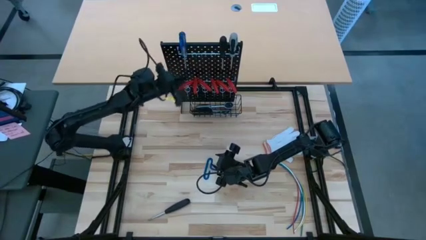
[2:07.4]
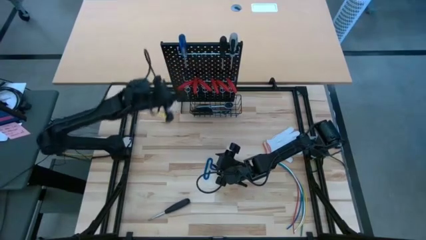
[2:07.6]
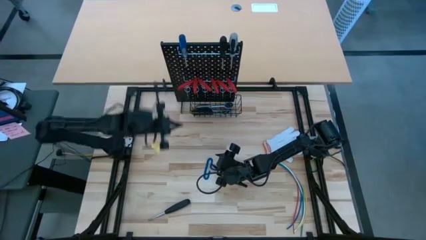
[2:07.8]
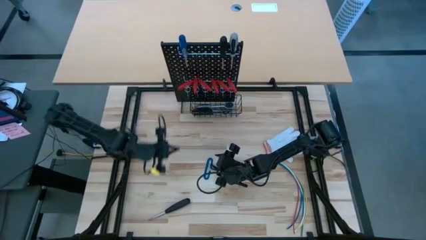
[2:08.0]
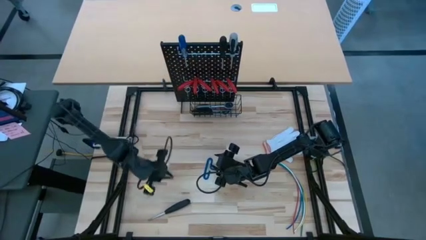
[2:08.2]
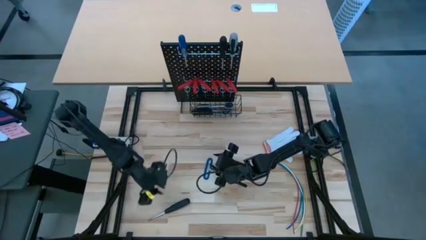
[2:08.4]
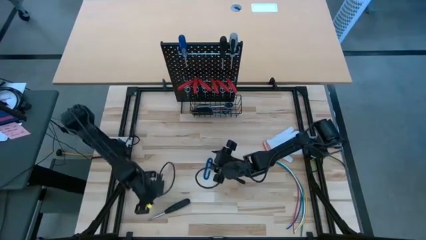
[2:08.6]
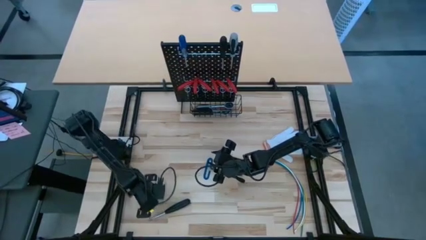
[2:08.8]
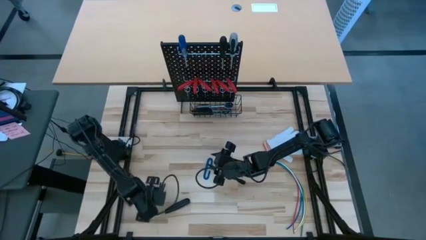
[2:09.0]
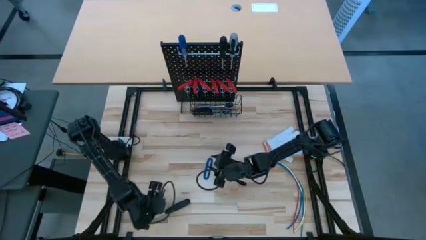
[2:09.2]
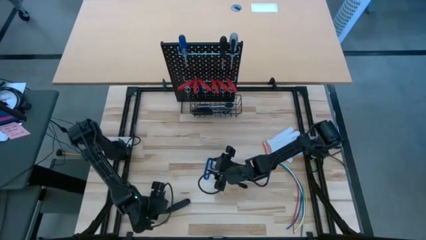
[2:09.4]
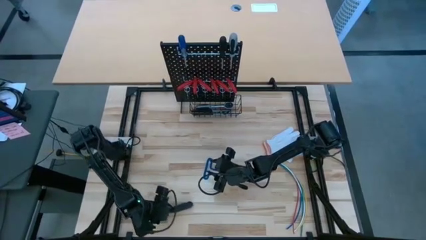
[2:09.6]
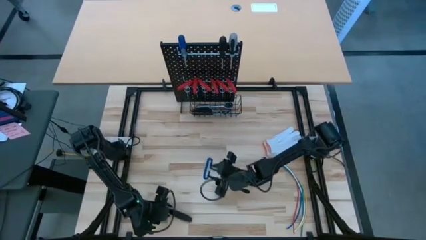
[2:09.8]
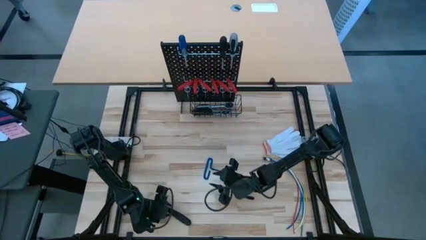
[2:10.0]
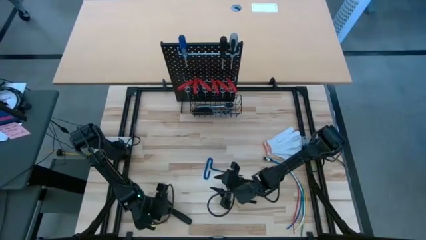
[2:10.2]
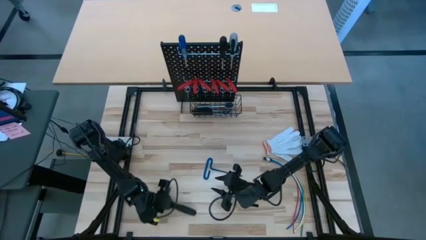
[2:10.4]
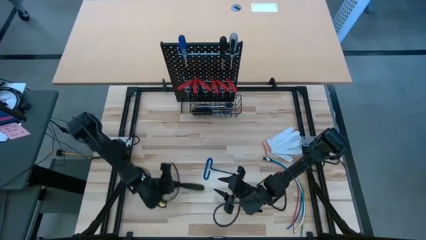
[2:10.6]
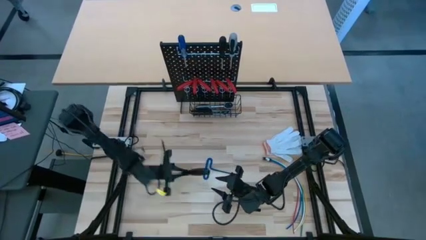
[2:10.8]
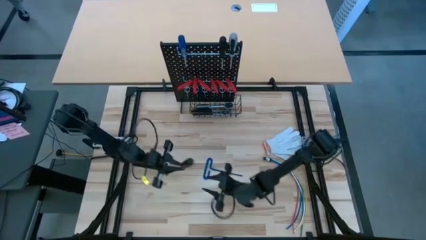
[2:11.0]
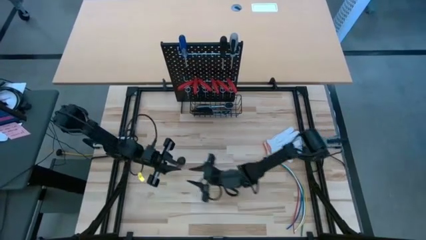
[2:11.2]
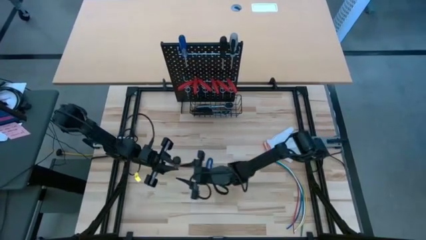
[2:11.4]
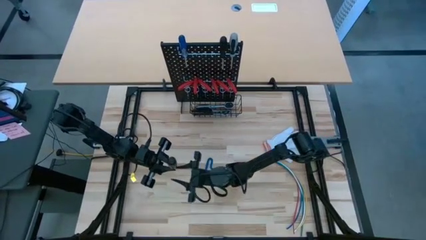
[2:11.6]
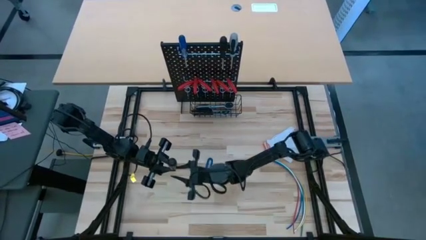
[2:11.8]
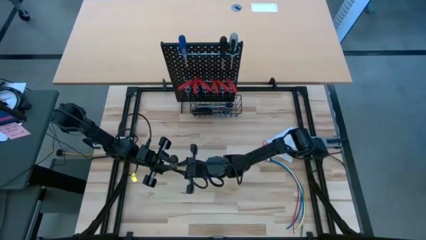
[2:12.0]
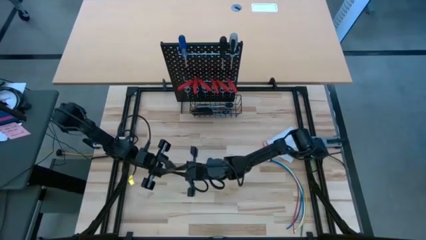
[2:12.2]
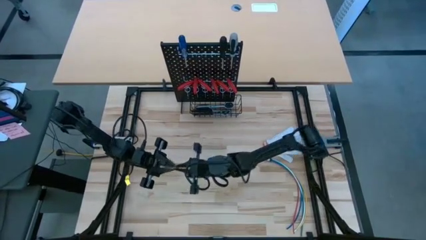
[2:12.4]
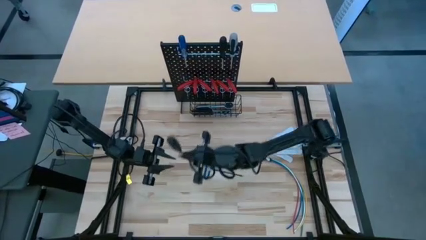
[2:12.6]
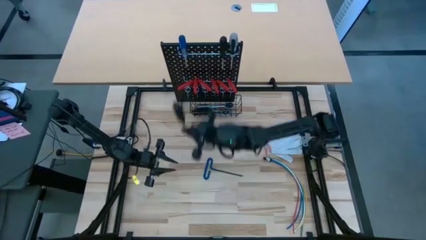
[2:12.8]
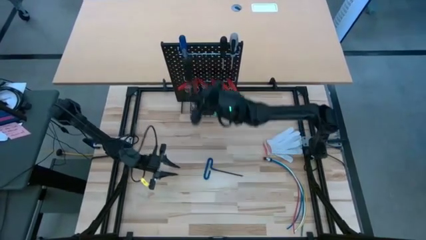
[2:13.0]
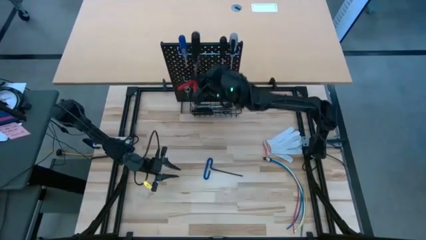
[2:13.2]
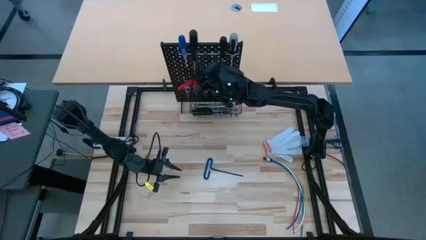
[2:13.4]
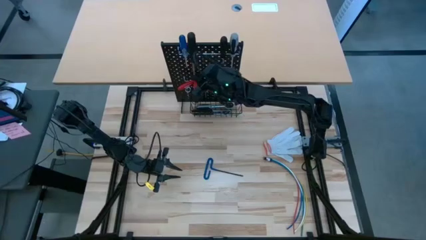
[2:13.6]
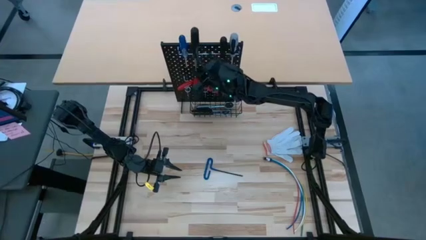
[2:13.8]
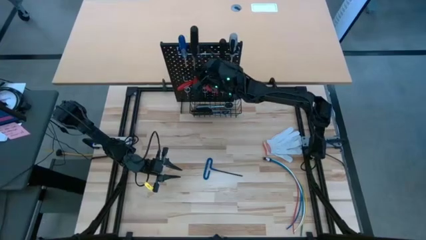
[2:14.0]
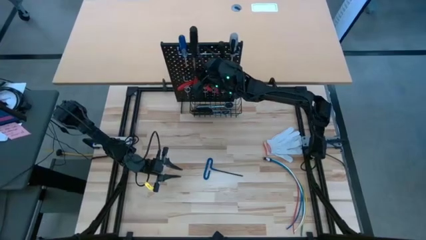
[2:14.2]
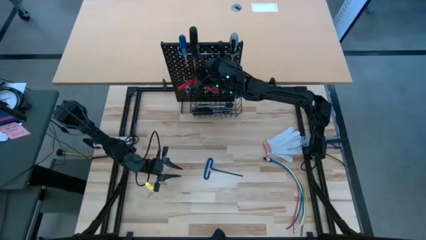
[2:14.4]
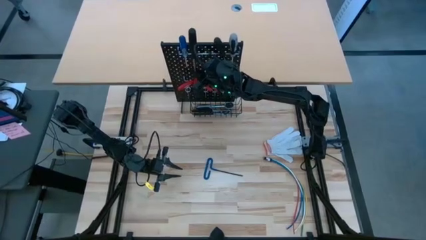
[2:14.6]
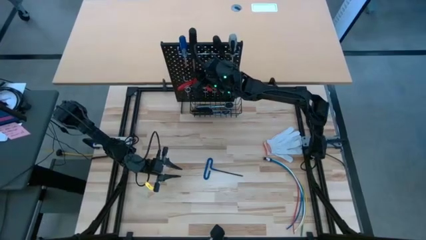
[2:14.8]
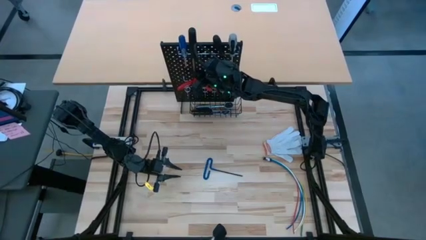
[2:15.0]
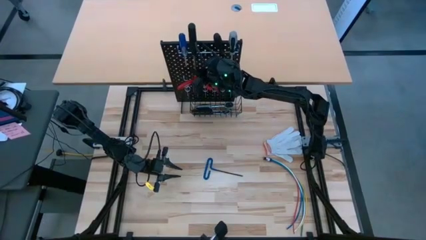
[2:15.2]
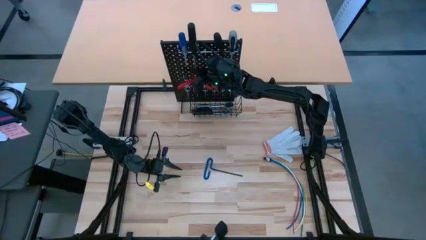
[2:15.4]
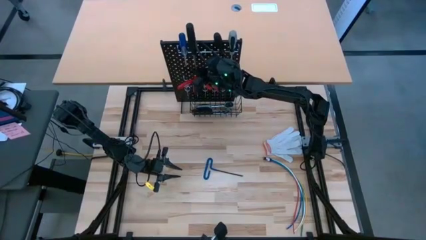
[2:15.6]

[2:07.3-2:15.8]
Task: Hang tools onto peg board
Hang the black screwdriver on the pegboard

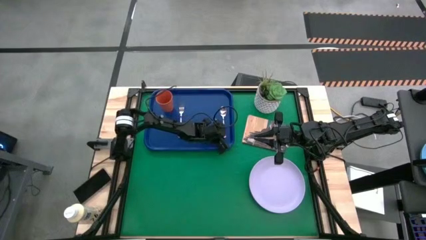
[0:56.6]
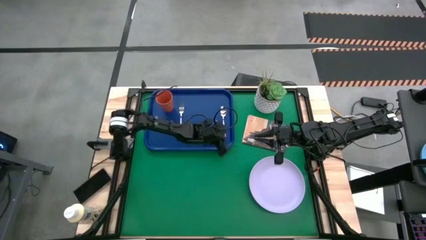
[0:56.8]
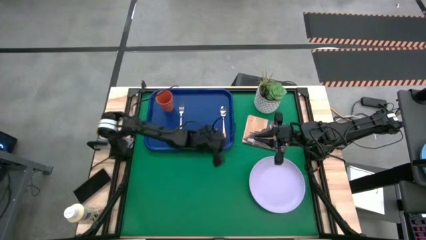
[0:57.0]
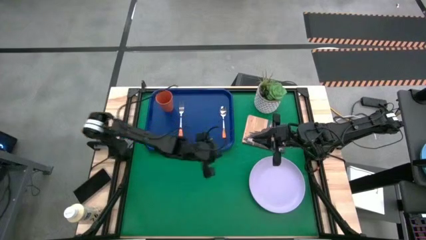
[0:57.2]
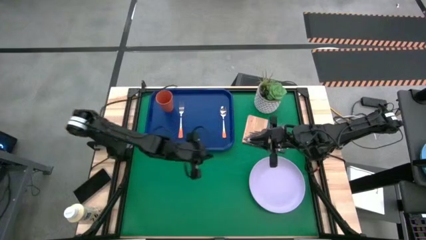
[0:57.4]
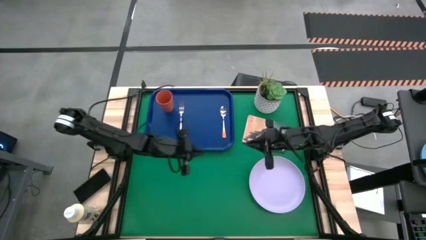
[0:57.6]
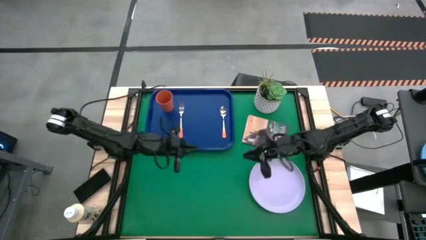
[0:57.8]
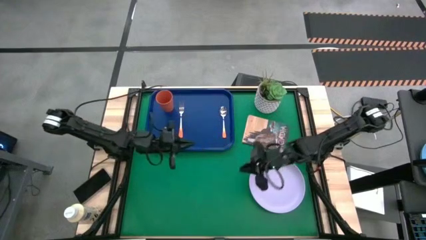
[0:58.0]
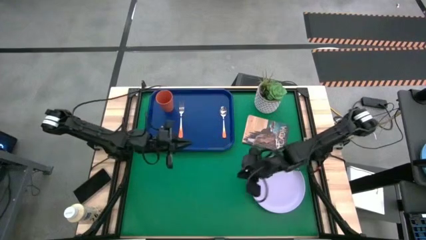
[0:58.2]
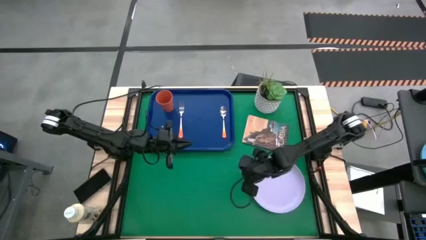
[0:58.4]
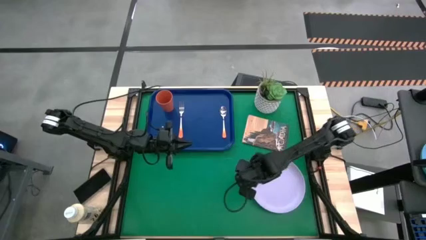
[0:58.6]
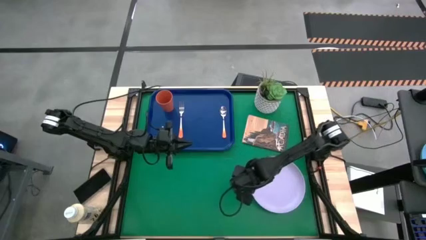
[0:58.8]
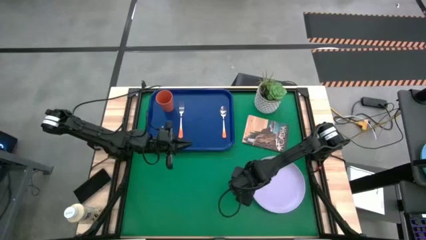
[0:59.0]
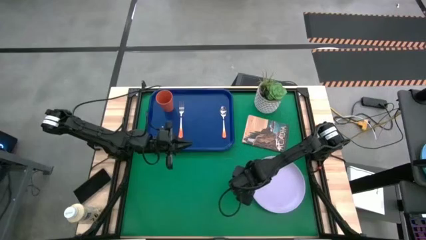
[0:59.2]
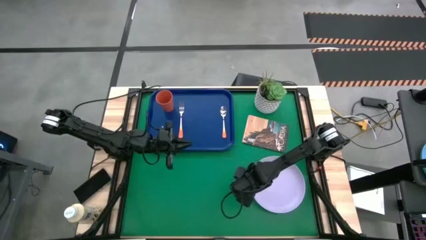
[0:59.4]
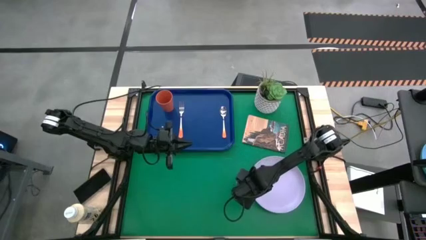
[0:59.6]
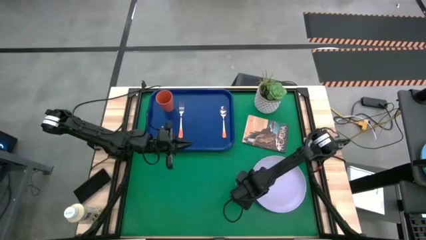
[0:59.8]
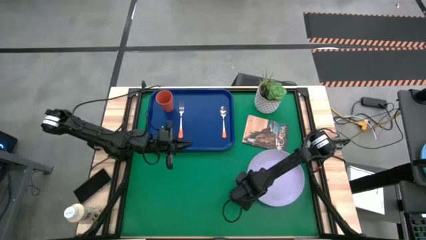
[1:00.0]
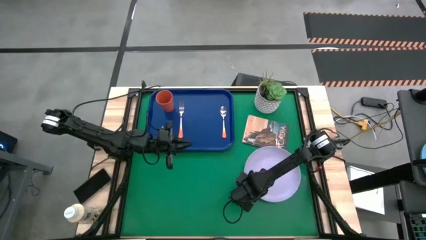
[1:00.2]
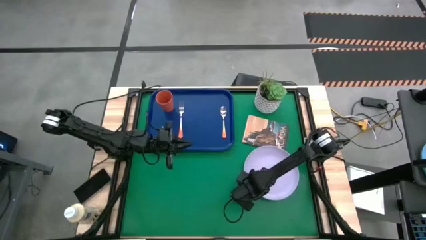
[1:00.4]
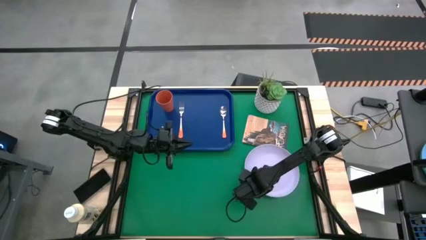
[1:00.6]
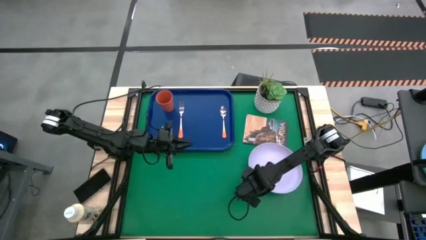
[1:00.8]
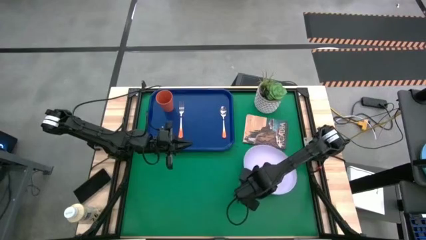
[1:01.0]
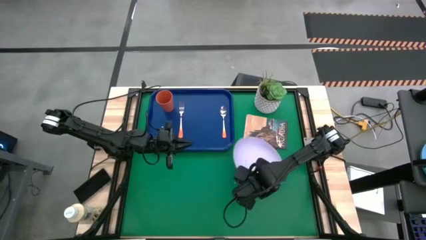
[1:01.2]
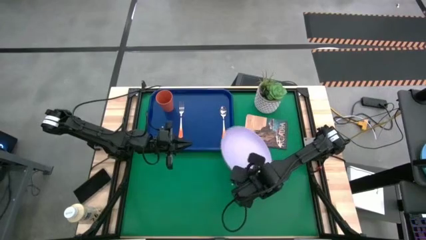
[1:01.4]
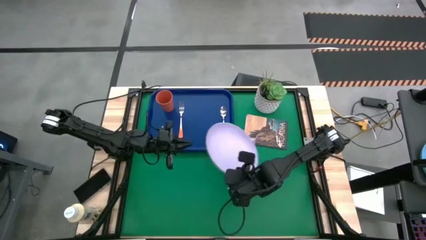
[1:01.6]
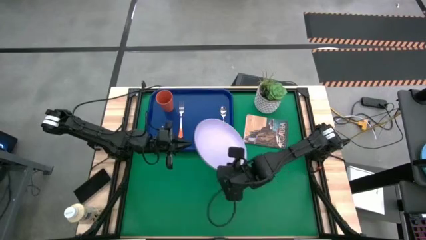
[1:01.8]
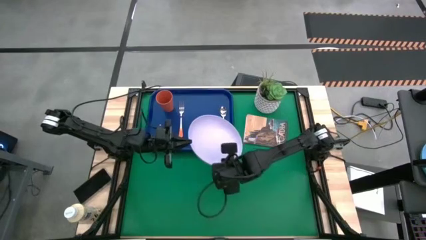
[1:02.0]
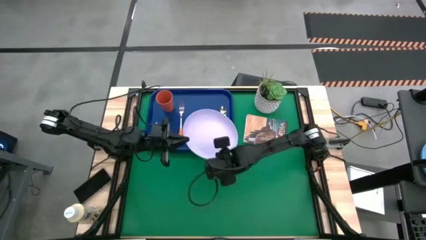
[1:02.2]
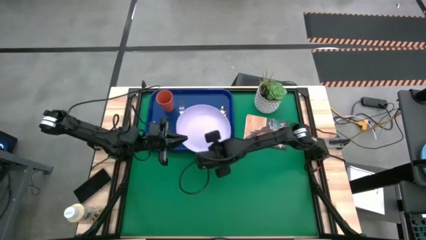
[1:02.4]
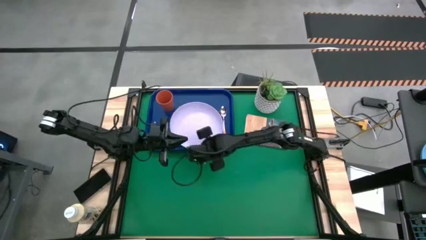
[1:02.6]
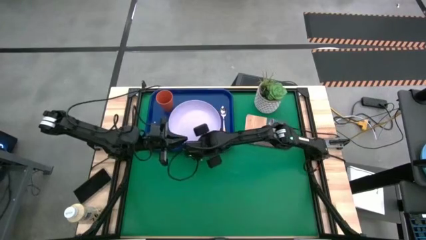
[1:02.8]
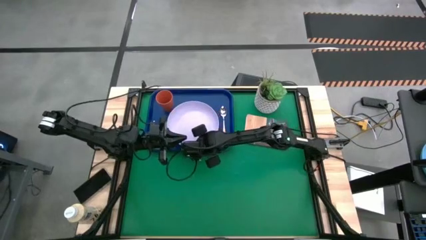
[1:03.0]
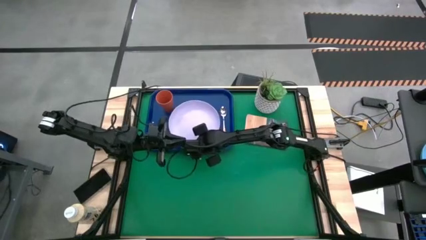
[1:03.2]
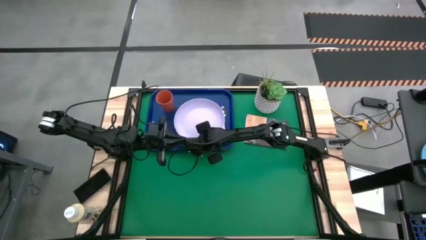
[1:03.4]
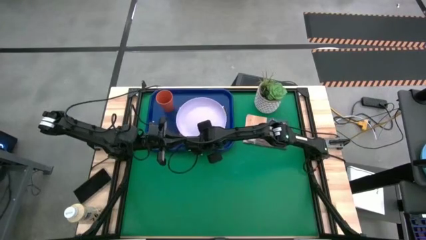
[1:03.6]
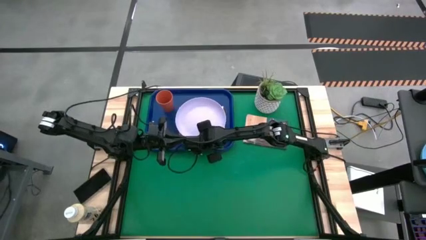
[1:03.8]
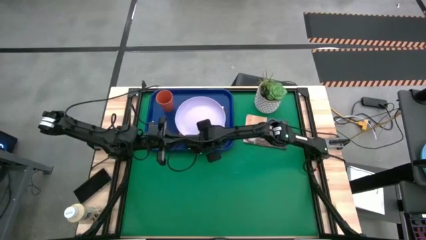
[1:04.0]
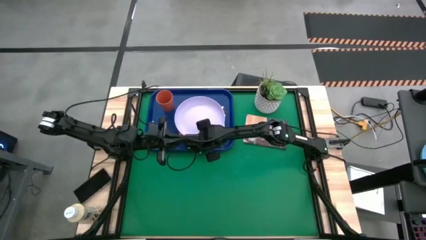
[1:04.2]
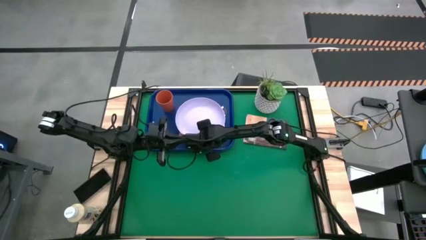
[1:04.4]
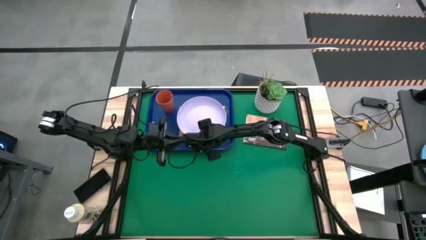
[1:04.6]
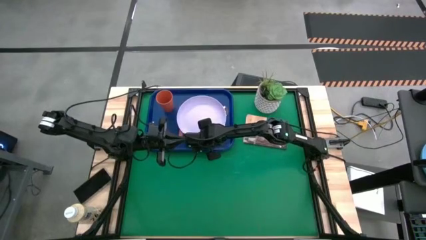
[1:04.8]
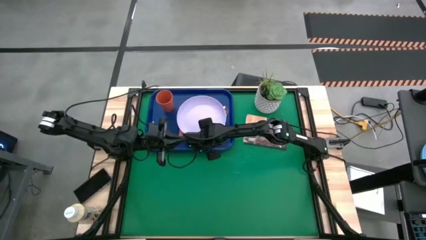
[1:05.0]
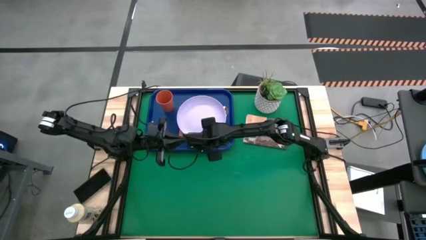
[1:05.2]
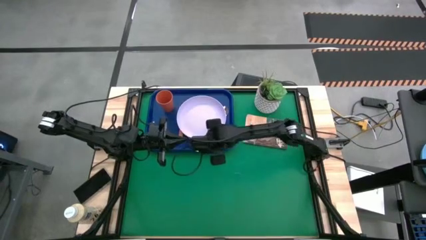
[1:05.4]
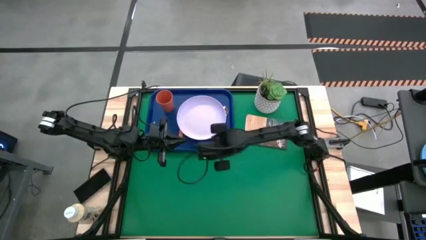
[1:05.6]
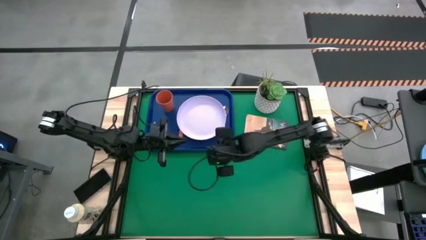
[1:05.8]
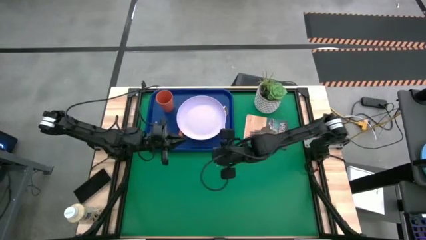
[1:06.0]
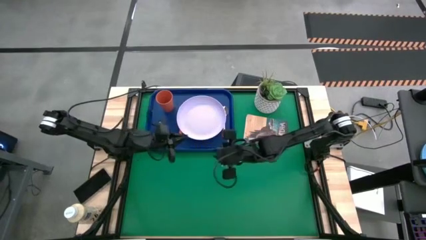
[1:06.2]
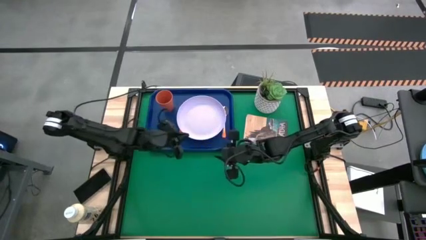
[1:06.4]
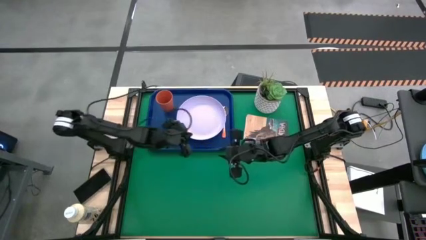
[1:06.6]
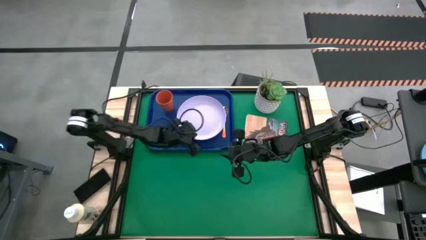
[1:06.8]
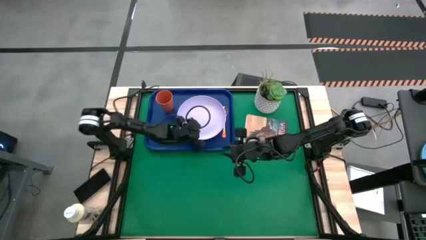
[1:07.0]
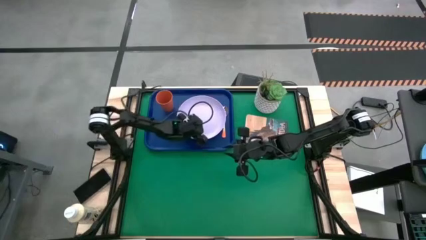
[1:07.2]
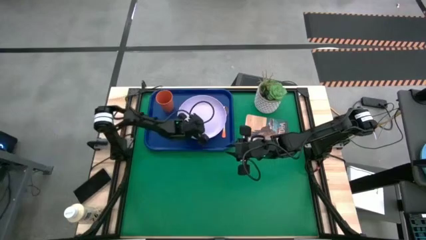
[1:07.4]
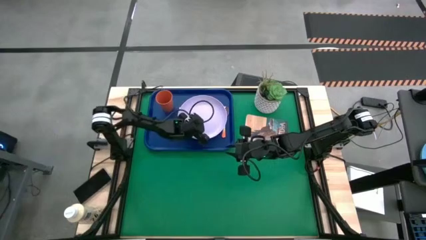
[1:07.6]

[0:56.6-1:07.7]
Task: Pick and place plate/cup/fork/spoon on tray
Put the white plate on the blue tray to the right of the orange fork
